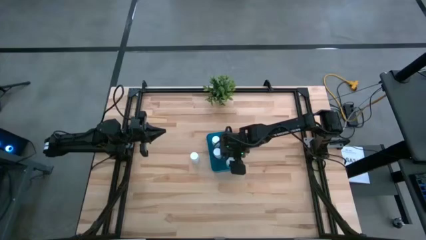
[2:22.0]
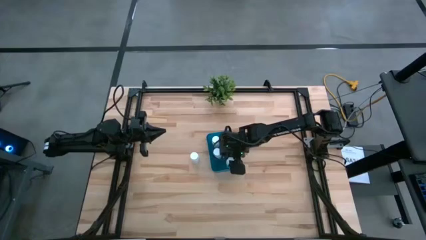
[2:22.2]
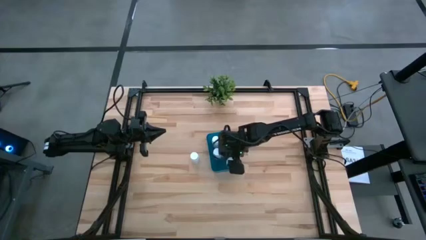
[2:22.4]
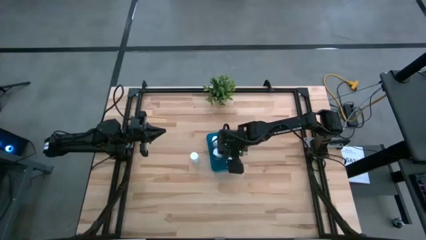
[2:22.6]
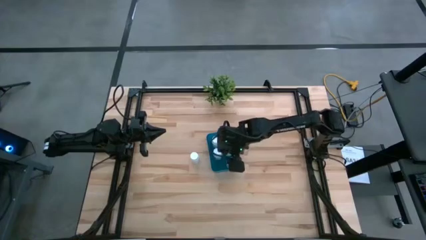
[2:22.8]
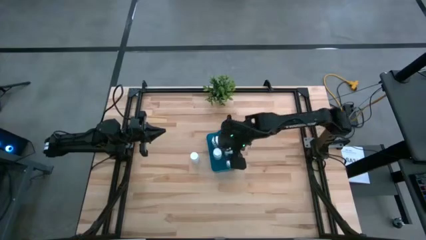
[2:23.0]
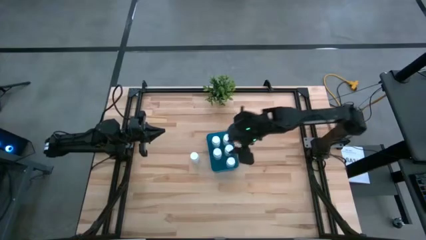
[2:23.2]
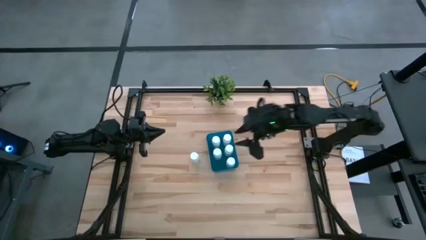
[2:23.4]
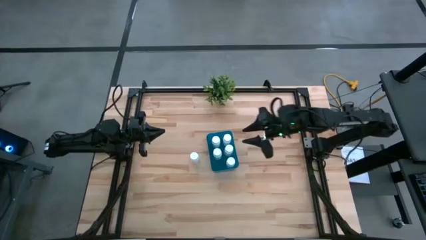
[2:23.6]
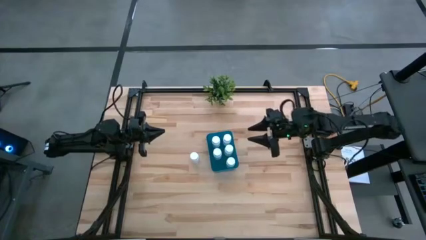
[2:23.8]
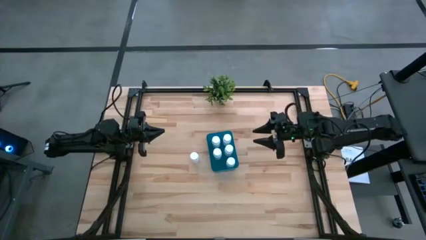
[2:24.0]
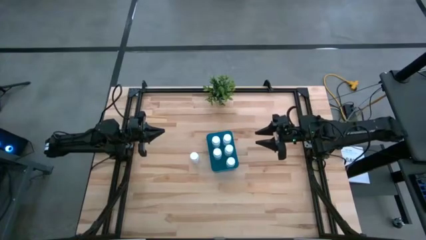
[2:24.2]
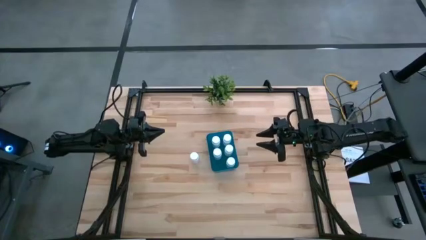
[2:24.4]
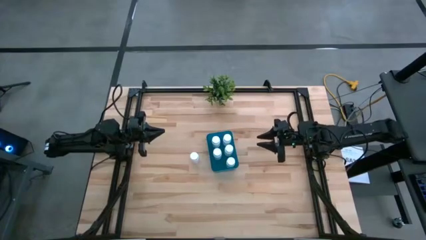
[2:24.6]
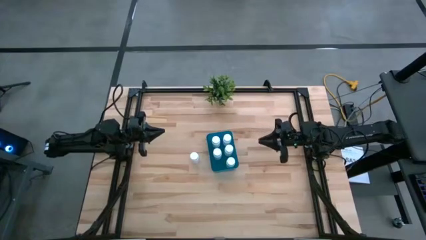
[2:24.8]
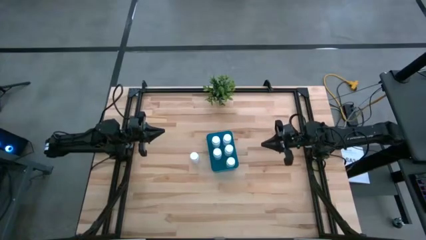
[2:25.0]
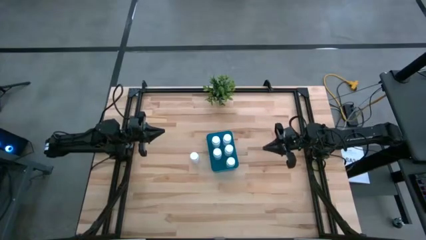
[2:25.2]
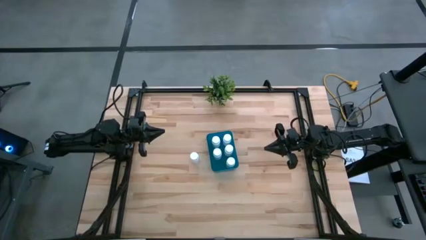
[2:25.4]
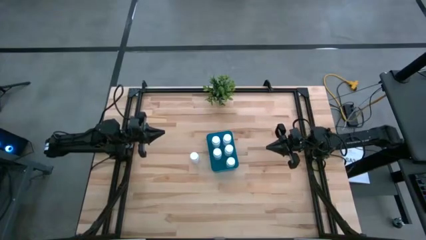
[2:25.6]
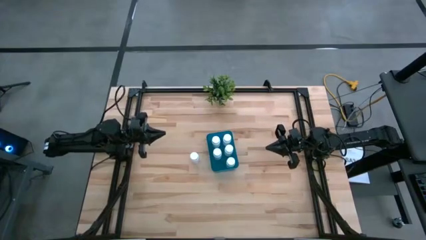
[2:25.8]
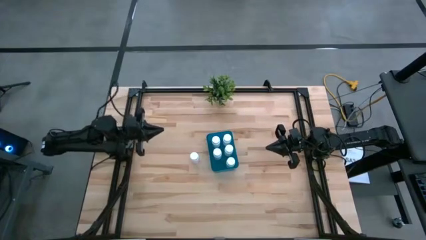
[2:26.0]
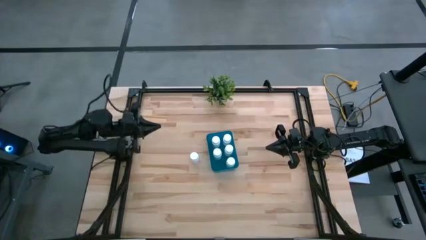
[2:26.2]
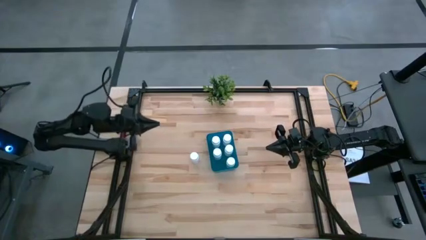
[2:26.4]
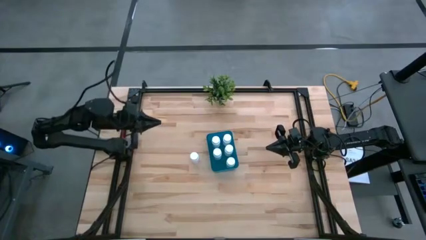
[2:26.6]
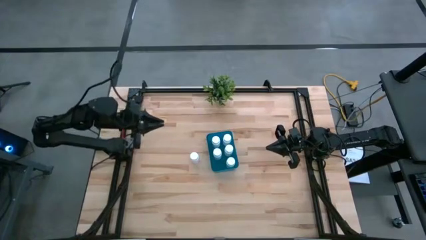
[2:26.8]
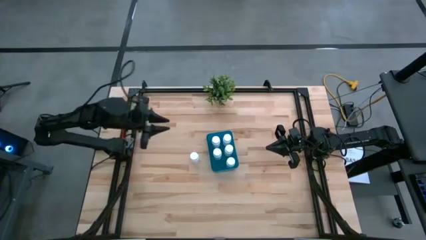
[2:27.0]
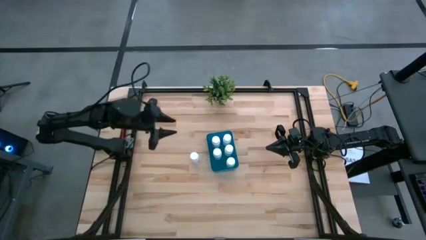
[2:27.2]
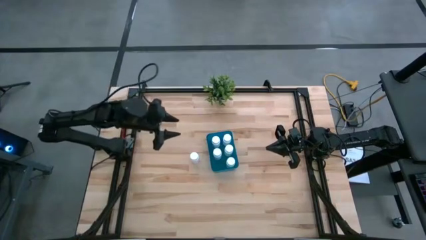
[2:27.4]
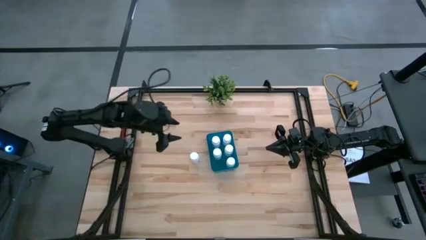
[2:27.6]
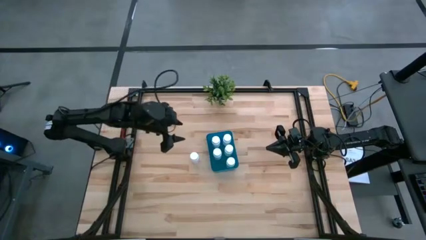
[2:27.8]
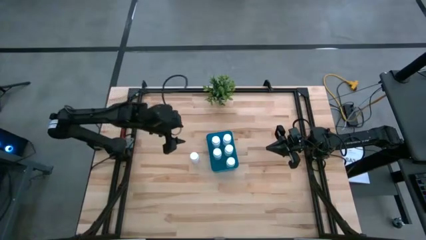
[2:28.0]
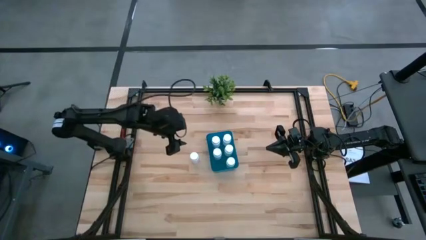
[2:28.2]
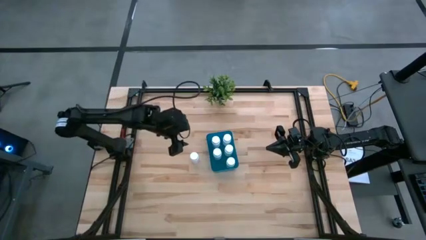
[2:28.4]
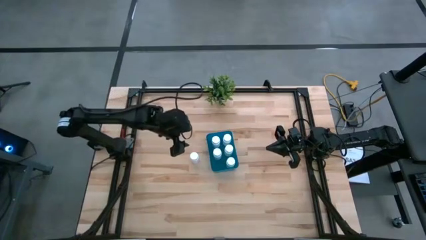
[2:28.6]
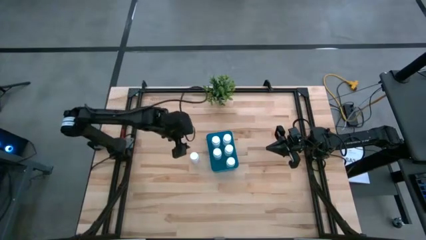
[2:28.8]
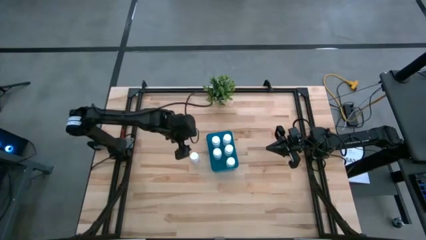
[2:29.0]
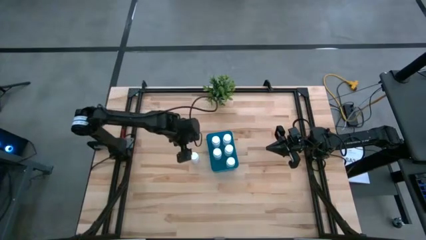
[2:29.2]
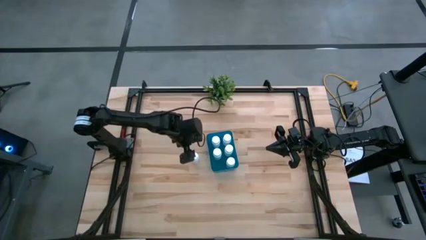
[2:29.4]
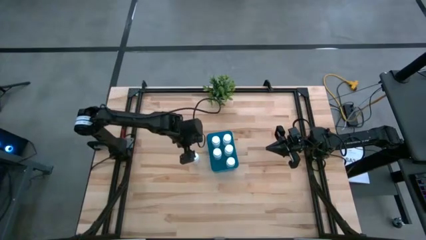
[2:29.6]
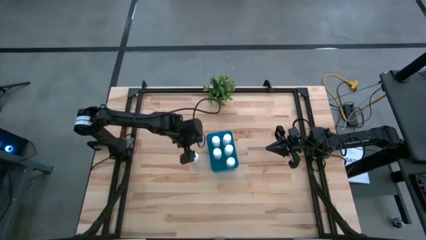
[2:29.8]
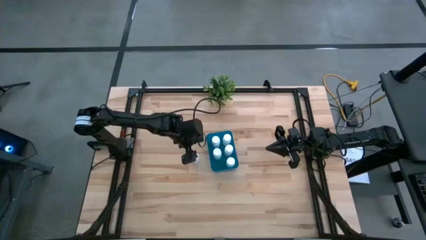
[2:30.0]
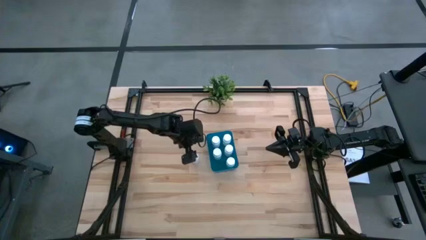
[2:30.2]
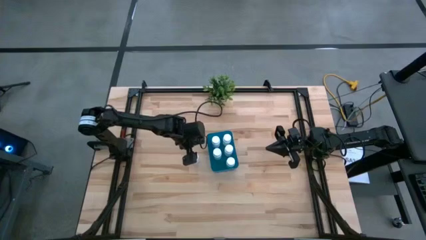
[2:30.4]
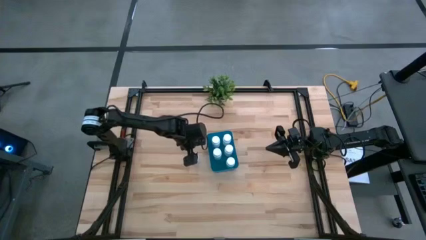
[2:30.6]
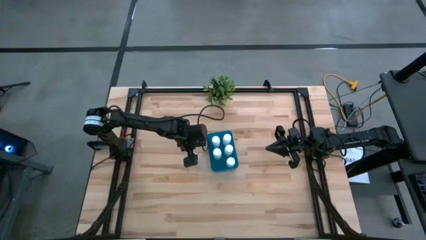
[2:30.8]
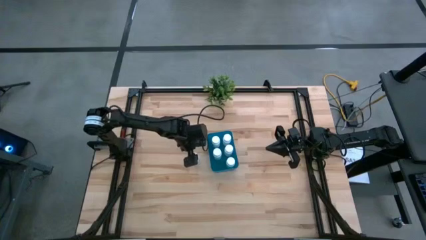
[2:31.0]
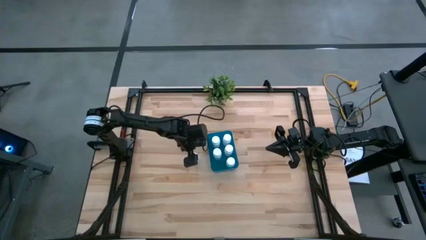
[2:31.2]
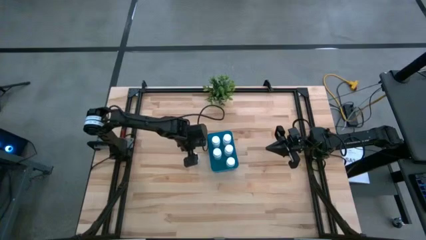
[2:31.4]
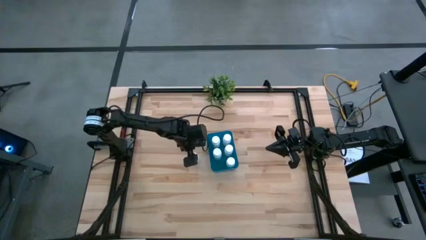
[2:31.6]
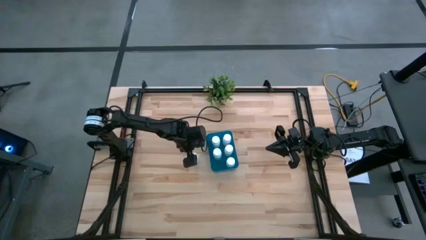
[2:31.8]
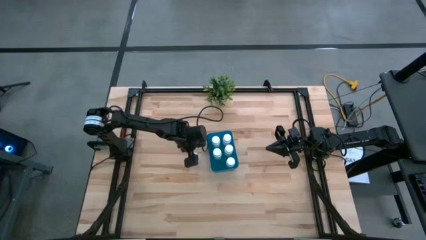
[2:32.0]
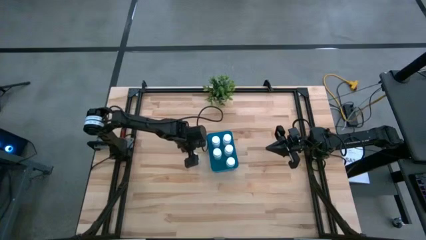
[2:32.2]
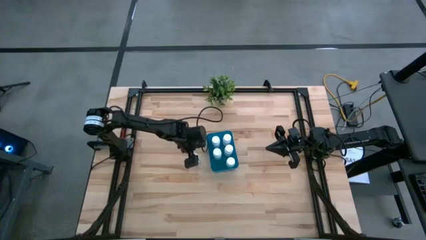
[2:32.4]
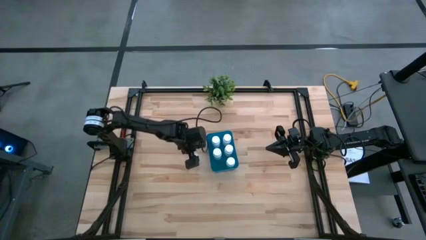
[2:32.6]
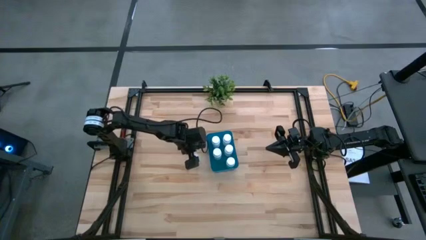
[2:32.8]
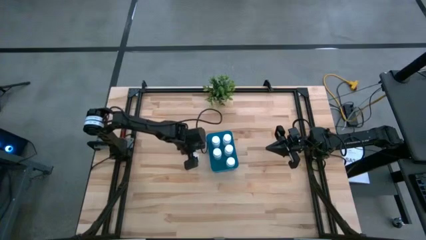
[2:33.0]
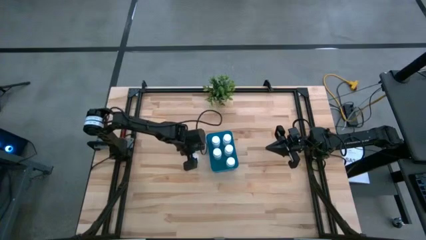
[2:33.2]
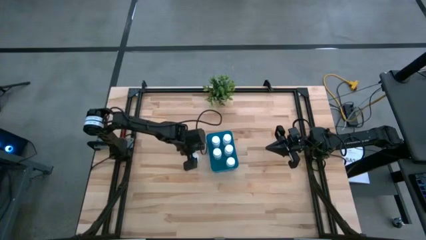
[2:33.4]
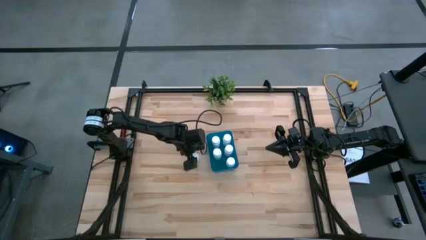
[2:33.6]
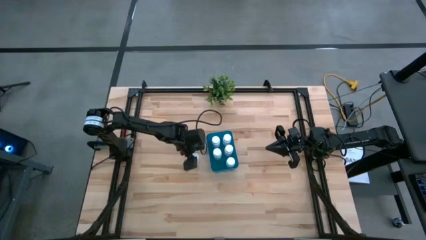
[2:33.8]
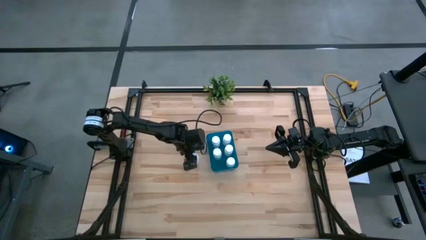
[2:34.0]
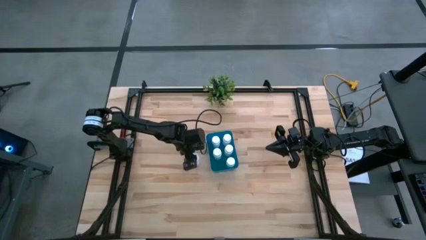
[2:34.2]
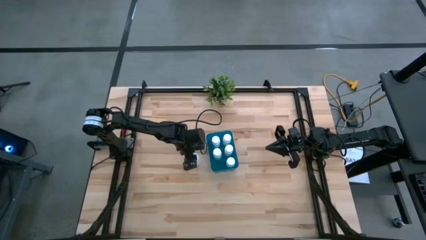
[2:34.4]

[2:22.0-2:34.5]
Task: Pick and place pill bottles into a basket
Put the white medicine bottle into the blue bin
